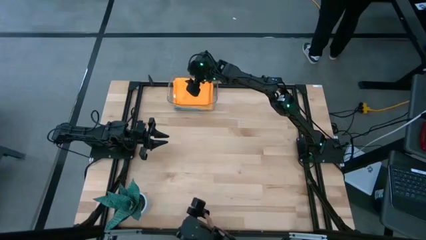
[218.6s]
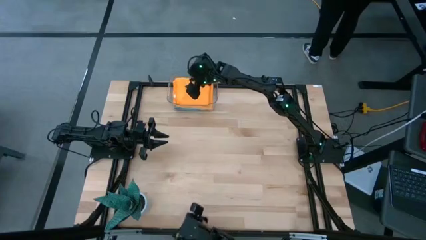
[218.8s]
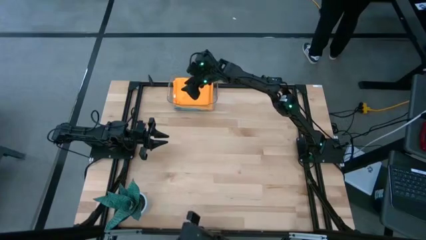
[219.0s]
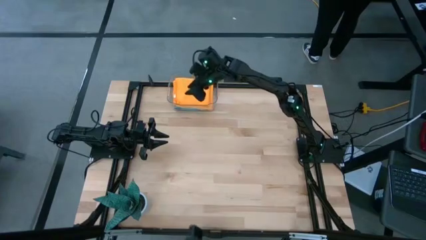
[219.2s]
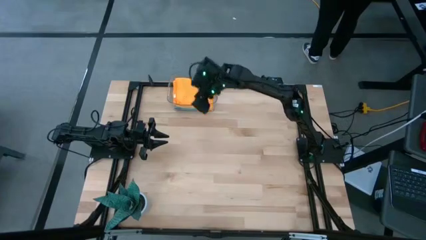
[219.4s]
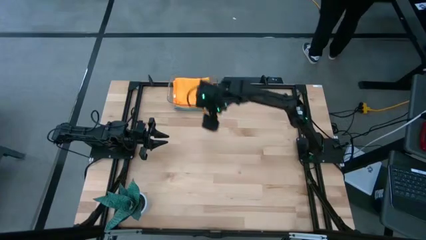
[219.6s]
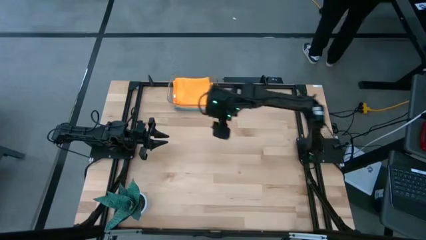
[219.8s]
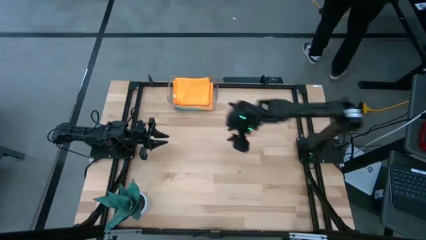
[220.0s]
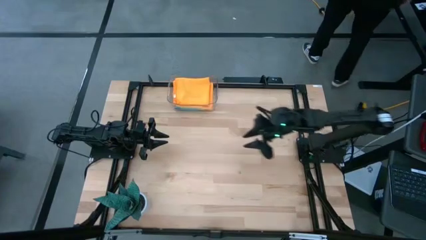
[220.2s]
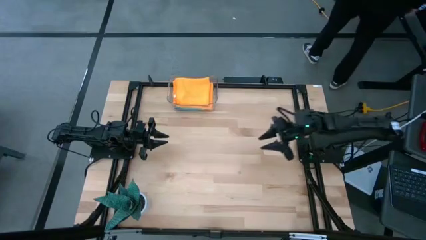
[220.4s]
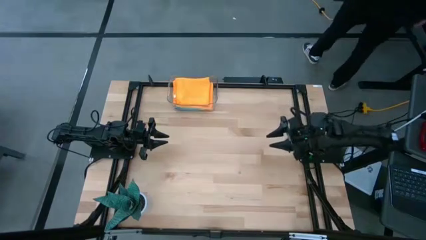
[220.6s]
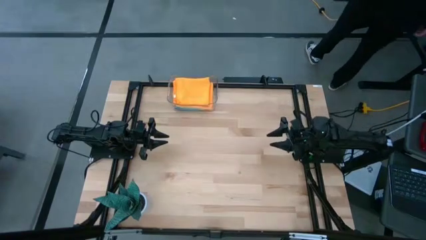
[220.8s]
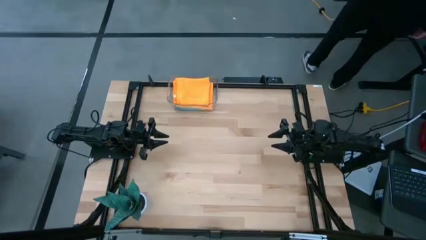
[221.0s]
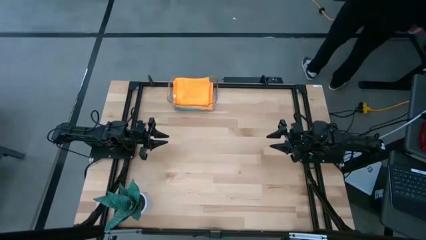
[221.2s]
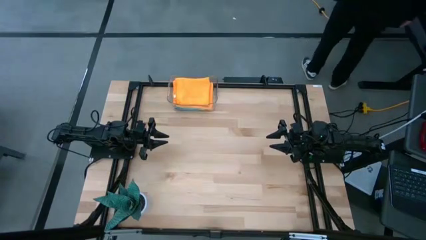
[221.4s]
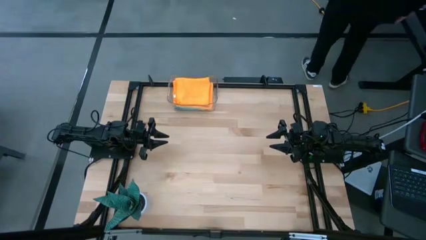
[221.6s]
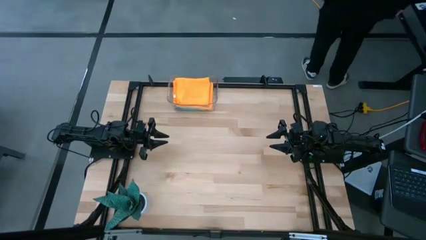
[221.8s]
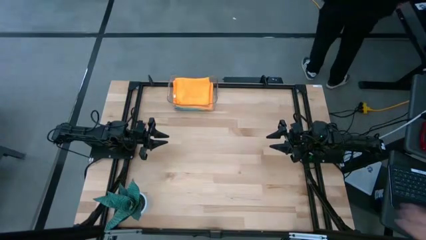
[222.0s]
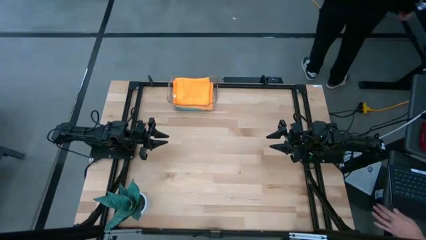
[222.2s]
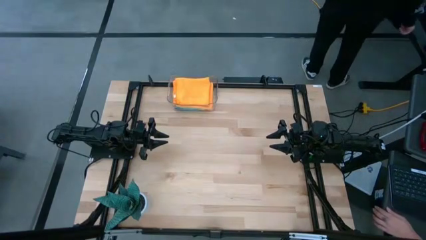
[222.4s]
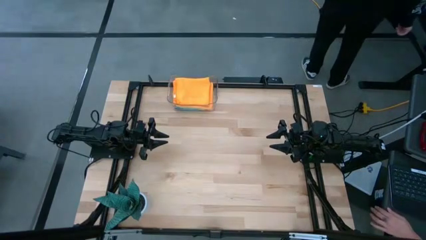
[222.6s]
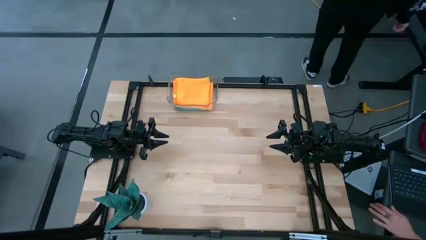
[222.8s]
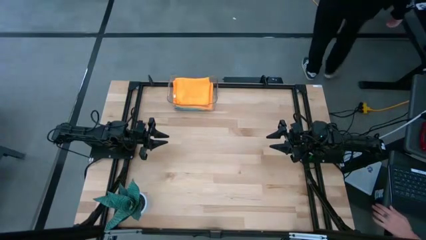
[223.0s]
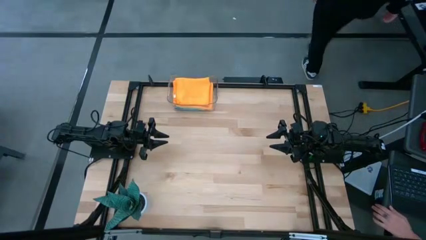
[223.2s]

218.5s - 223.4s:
Task: Fold microfiber towels
Return to Home Position

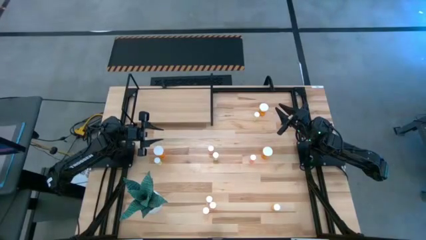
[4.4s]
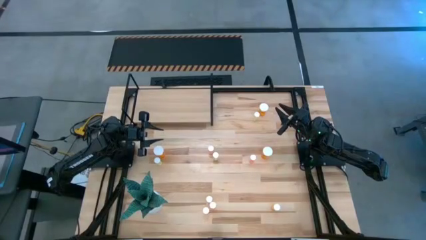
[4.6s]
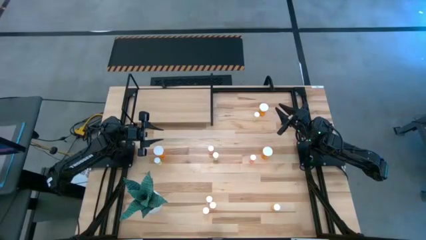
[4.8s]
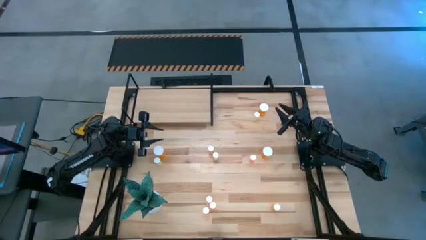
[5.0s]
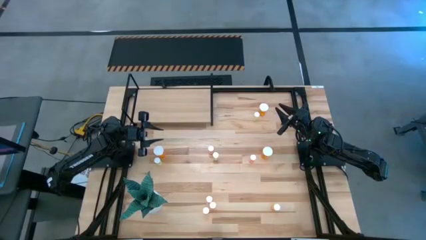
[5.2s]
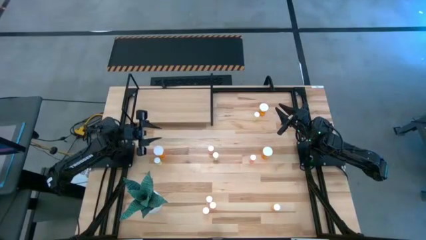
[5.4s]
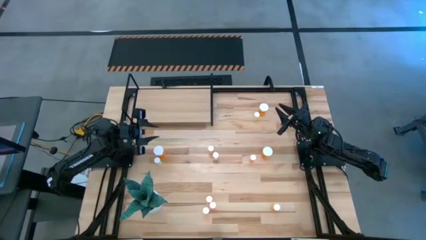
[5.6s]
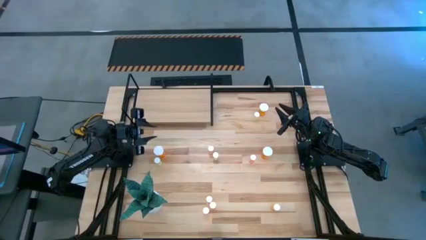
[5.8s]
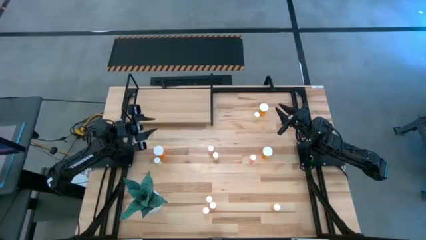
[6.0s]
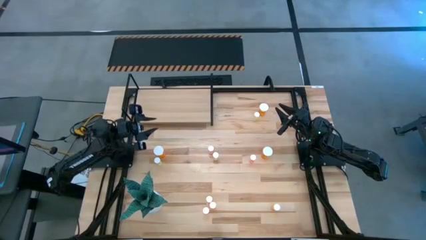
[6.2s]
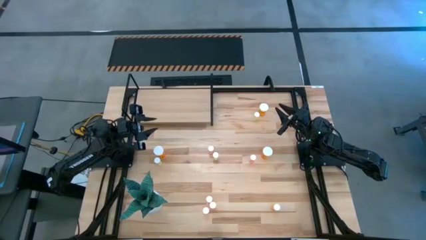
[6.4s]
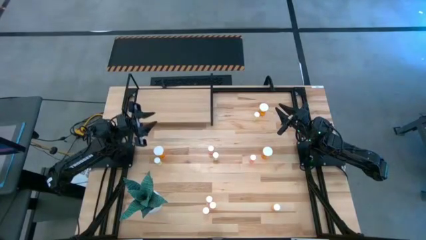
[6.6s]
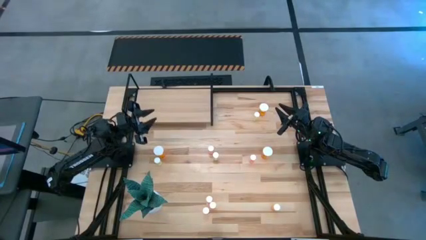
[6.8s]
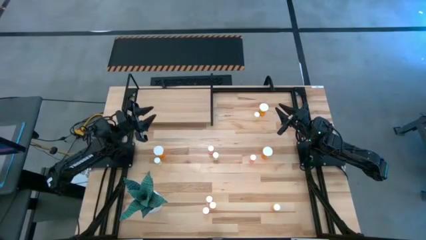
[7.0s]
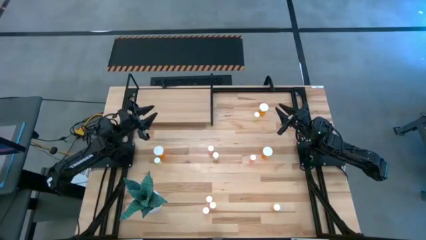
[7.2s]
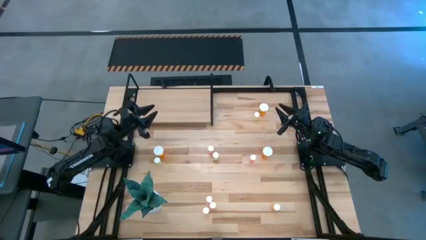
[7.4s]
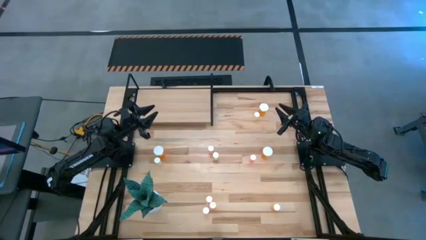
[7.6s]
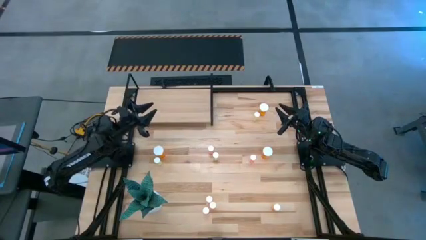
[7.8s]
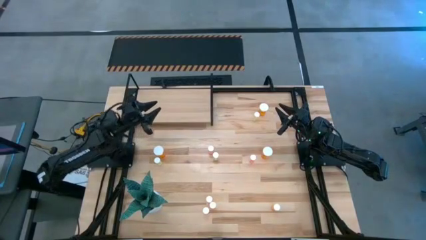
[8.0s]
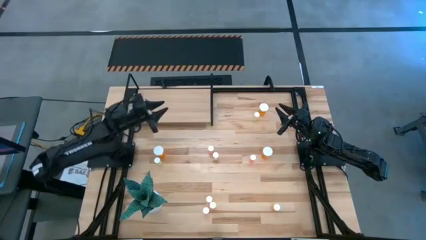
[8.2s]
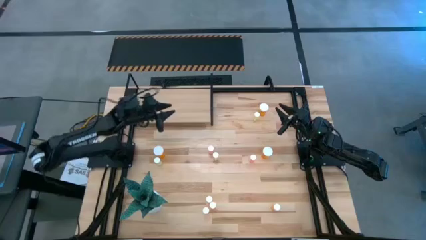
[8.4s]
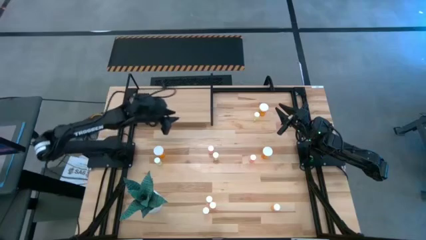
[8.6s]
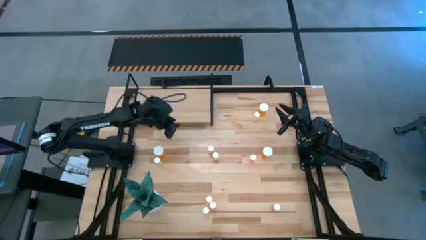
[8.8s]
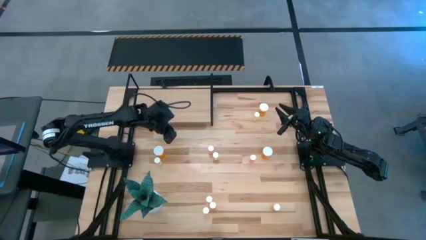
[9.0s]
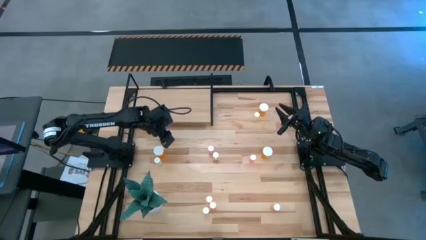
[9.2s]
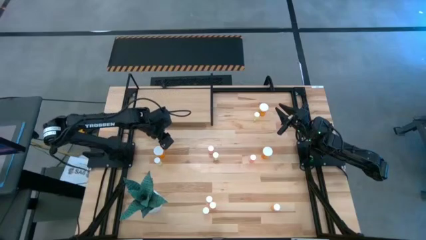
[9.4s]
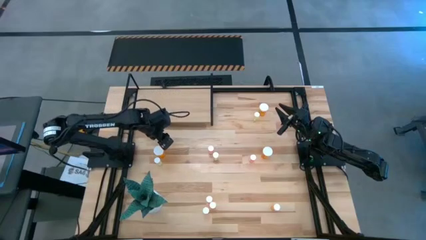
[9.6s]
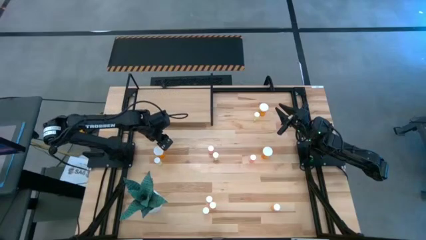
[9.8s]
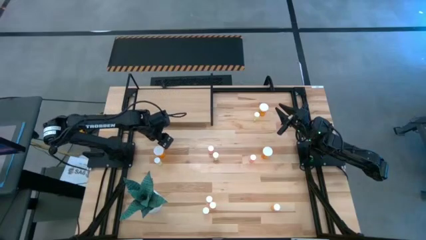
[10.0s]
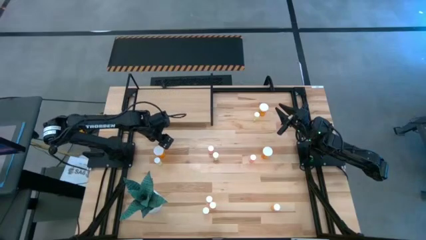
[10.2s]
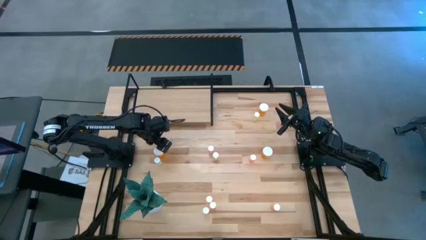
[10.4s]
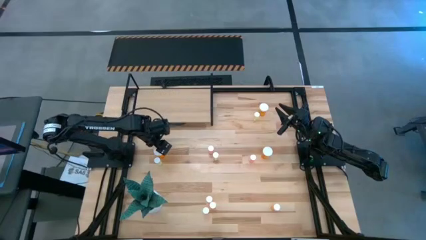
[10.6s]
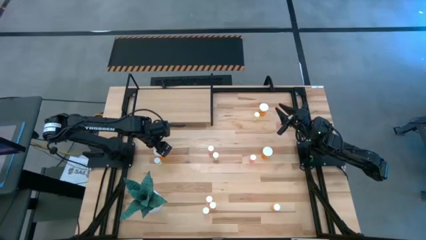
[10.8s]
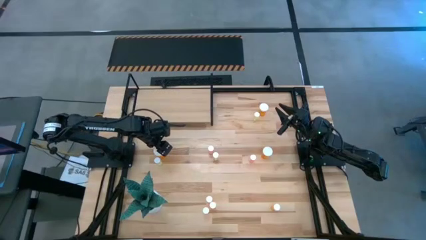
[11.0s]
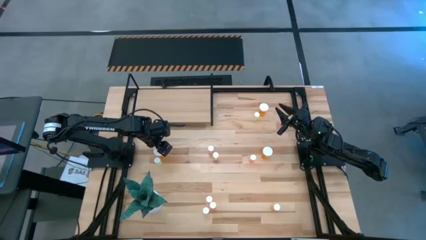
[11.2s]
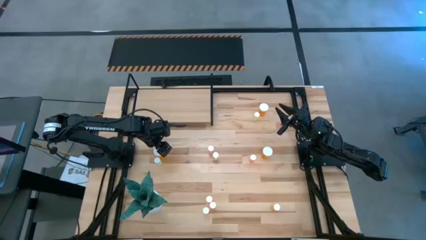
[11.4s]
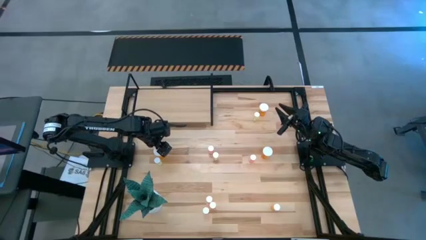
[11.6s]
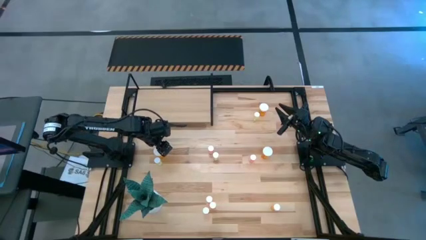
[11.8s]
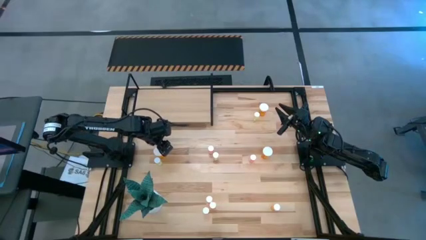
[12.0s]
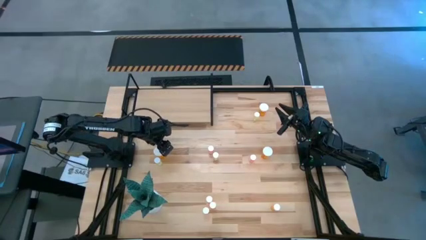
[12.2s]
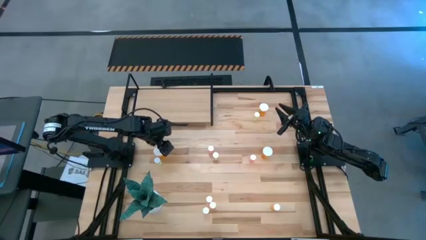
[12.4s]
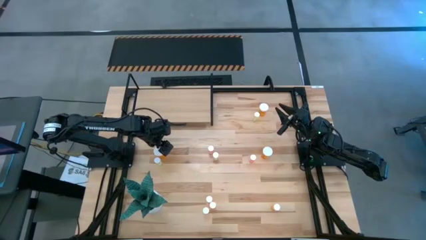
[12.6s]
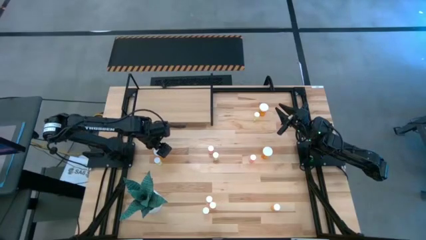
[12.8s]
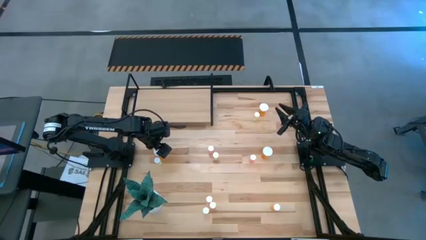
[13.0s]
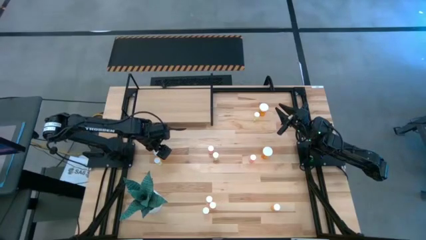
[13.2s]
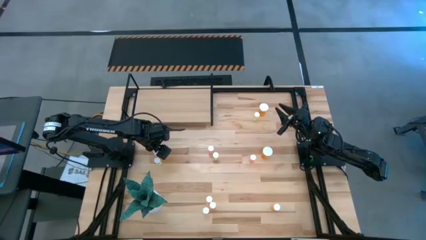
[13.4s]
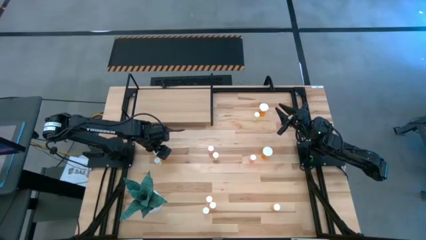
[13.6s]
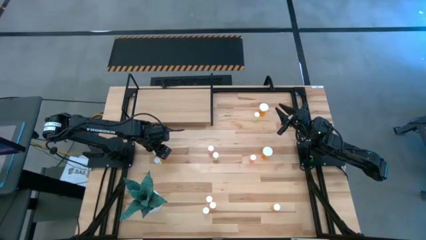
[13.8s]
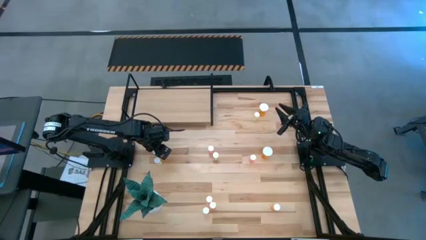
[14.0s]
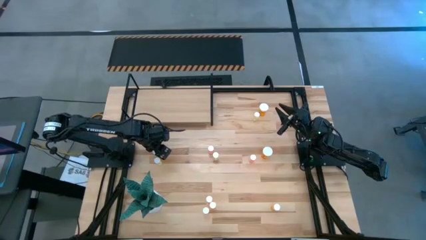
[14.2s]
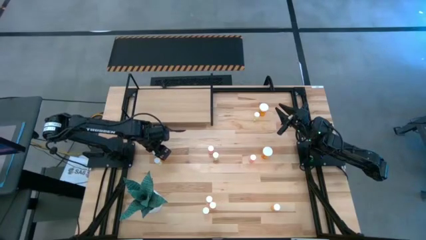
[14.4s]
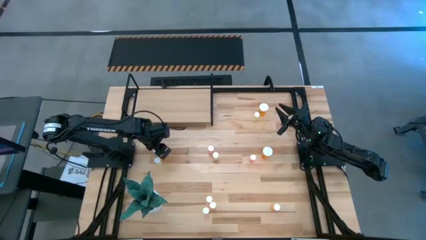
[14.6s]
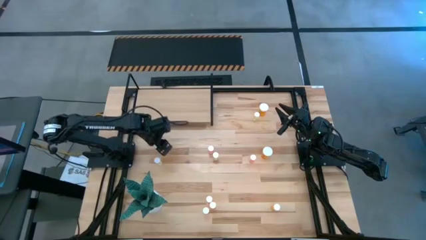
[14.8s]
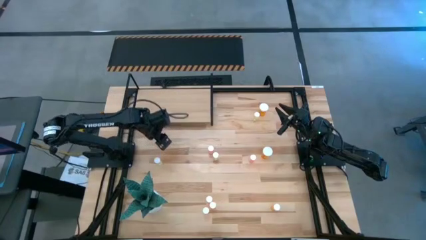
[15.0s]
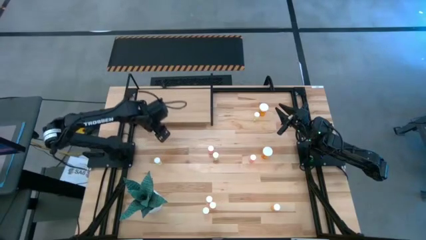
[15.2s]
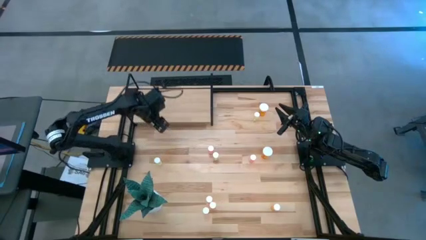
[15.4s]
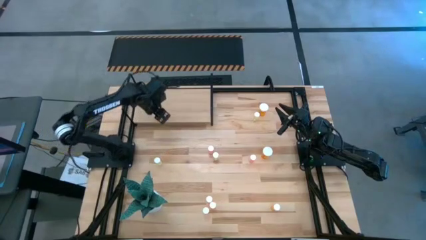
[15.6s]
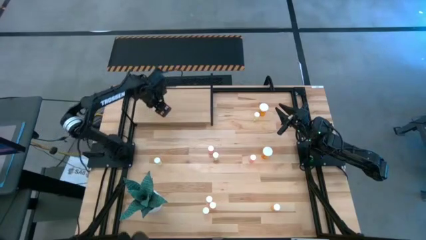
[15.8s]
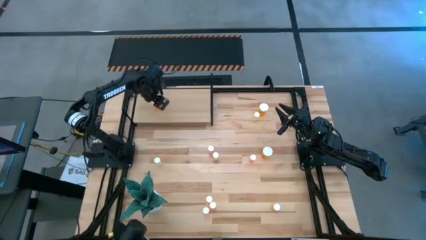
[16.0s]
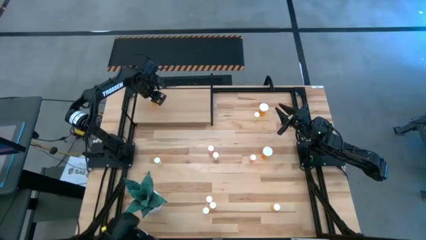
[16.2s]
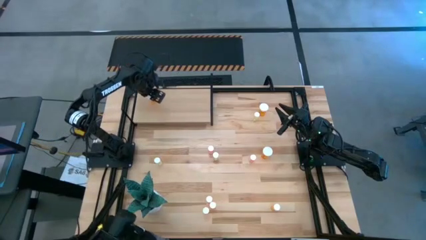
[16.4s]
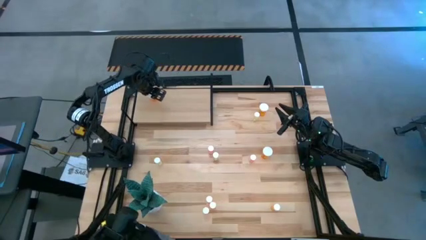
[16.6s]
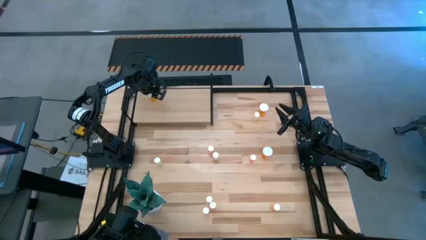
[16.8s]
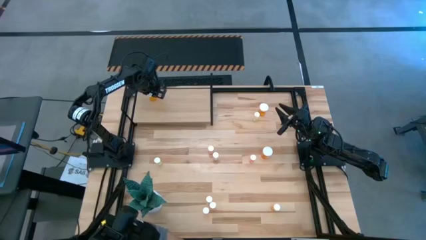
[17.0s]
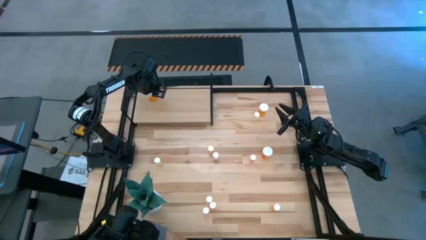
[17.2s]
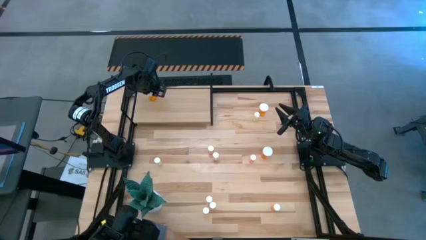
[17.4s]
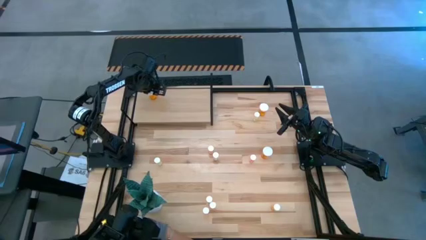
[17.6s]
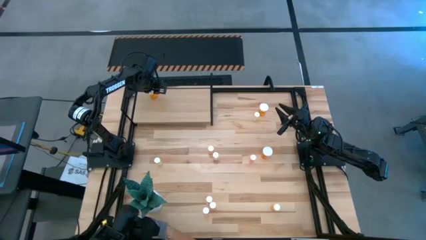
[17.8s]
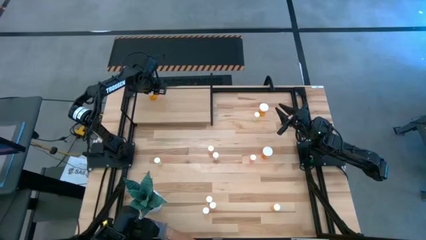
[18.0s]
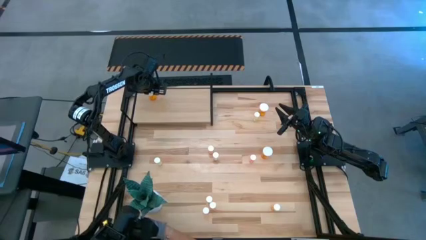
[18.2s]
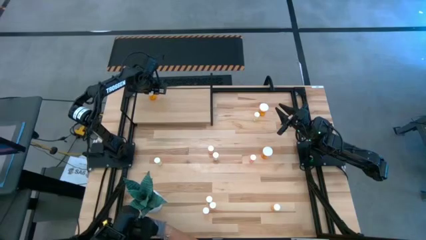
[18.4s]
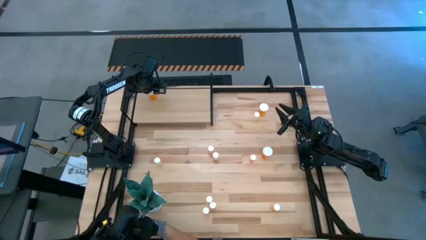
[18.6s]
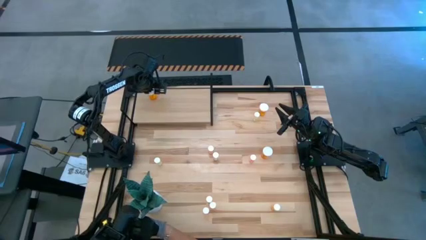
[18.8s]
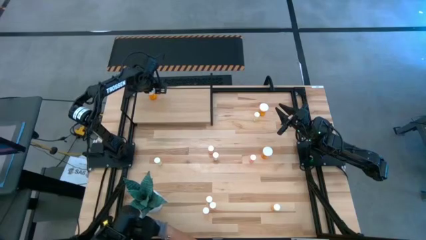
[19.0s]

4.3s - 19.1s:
Task: Pick and place medicine bottles onto shelf by color
Put the left big orange pill bottle on the shelf
